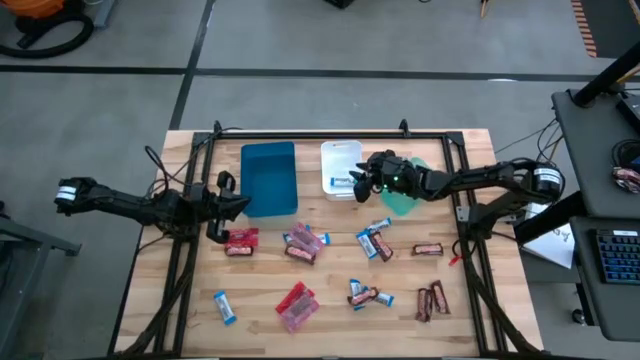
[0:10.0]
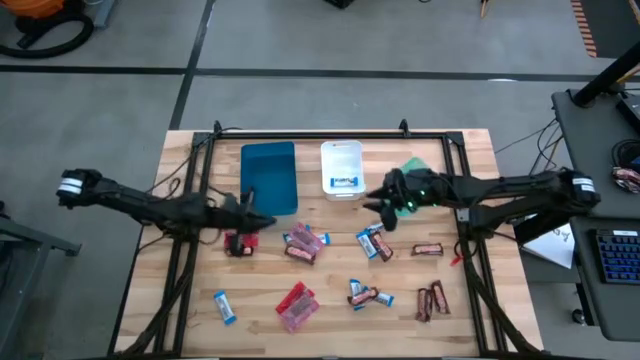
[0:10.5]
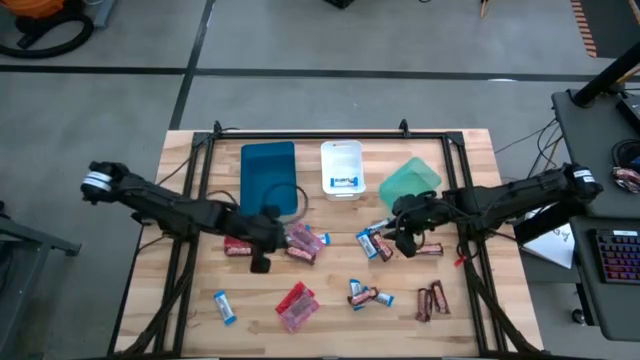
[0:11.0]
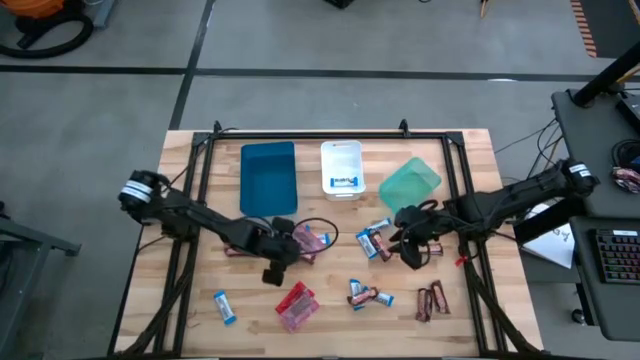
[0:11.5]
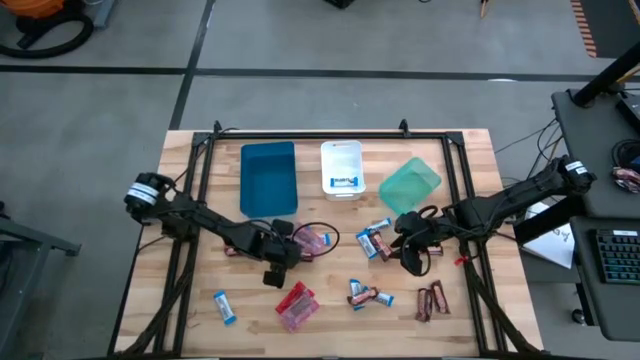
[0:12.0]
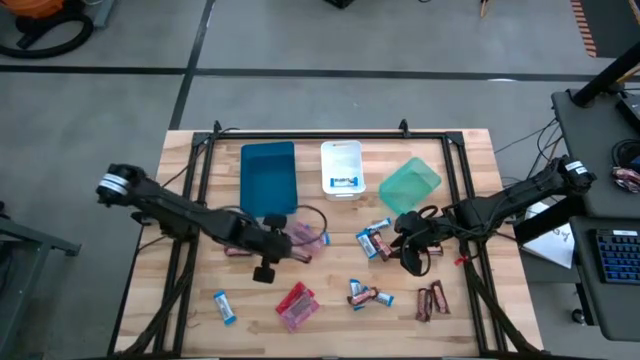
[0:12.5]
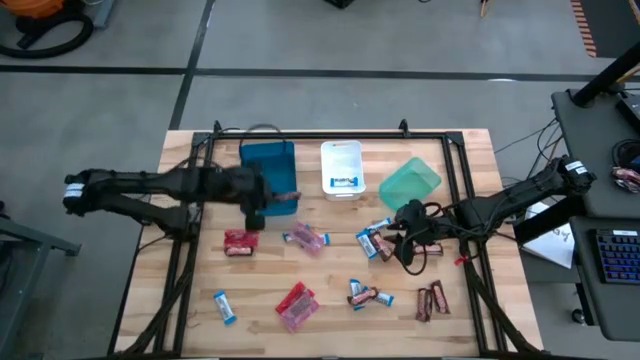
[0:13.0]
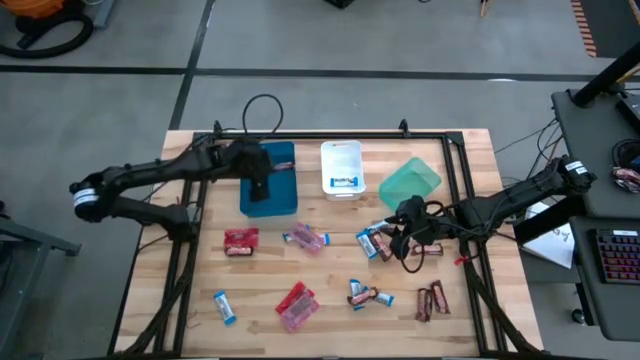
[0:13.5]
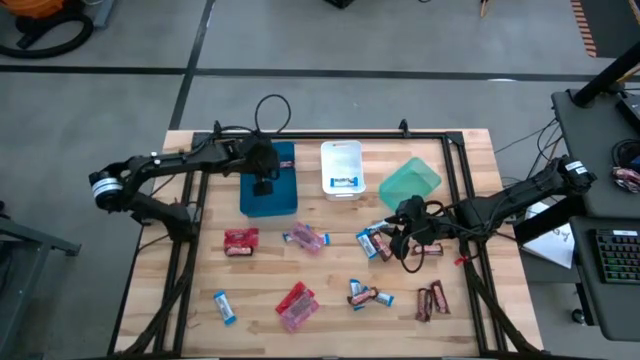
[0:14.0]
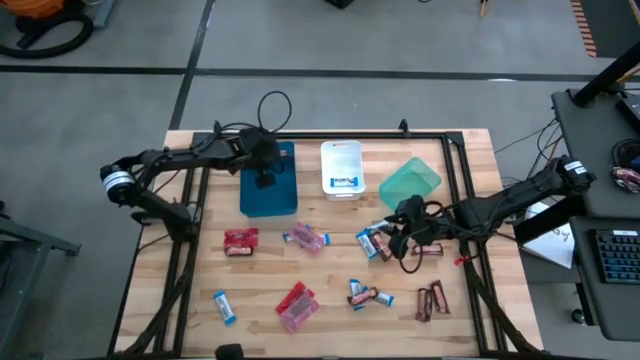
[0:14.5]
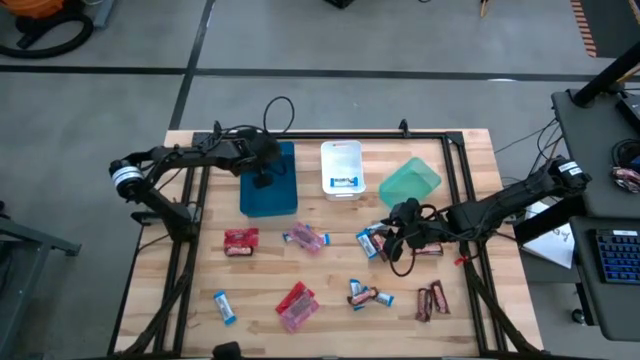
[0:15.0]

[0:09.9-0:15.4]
Task: Sort candy
Put the brown chocolate into the blue bin

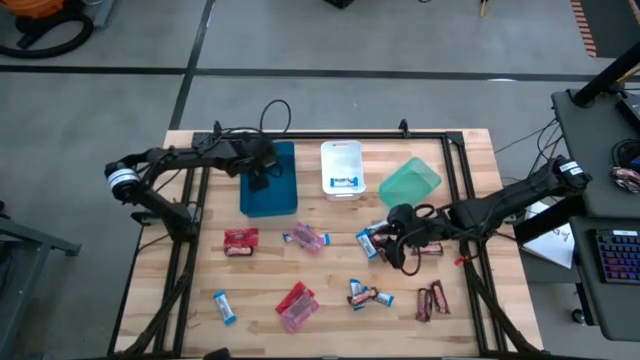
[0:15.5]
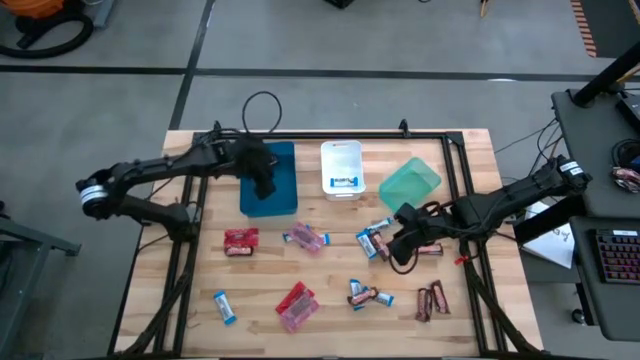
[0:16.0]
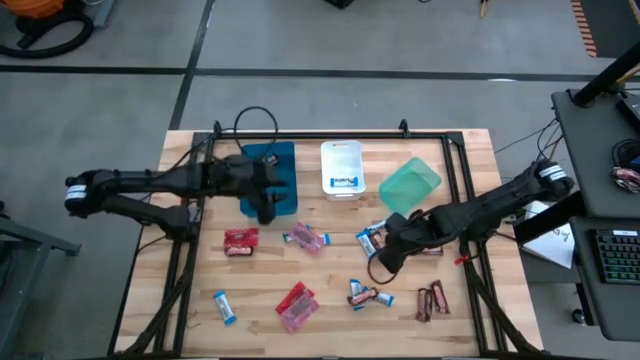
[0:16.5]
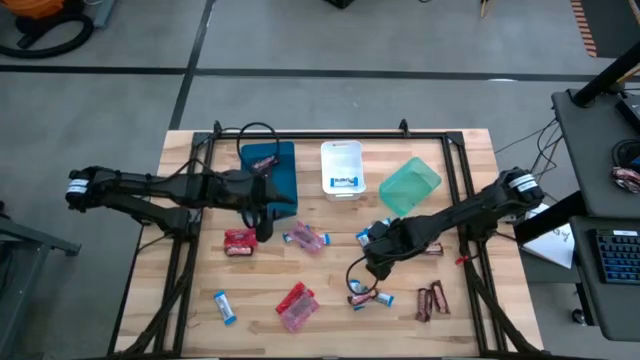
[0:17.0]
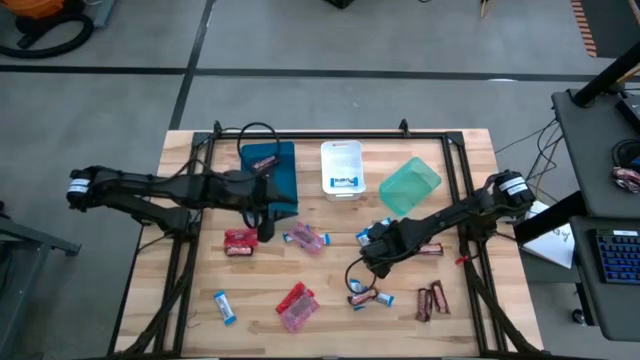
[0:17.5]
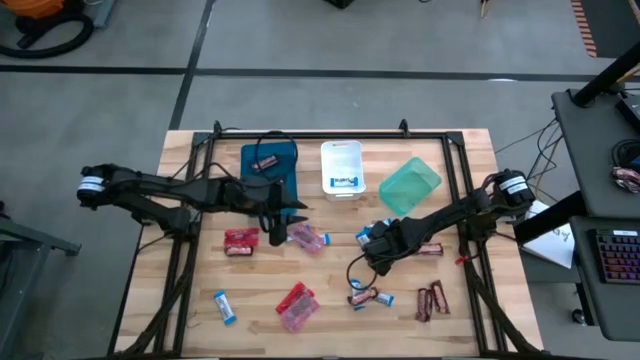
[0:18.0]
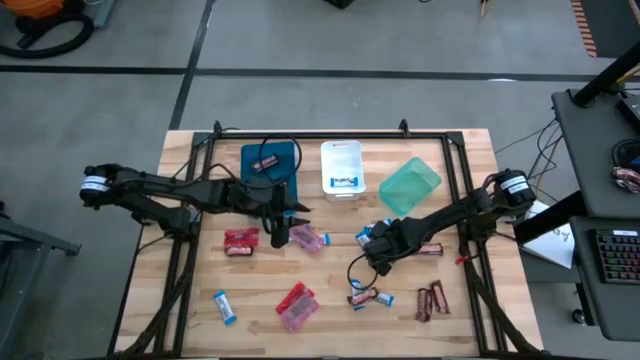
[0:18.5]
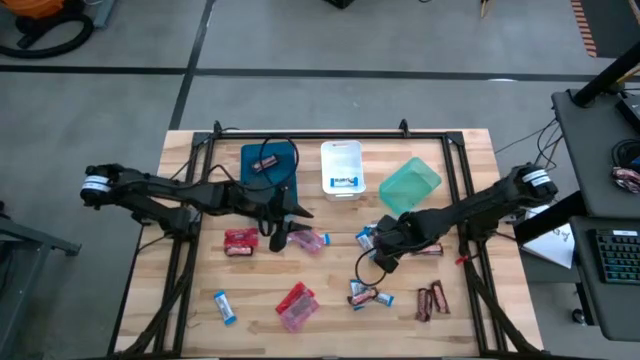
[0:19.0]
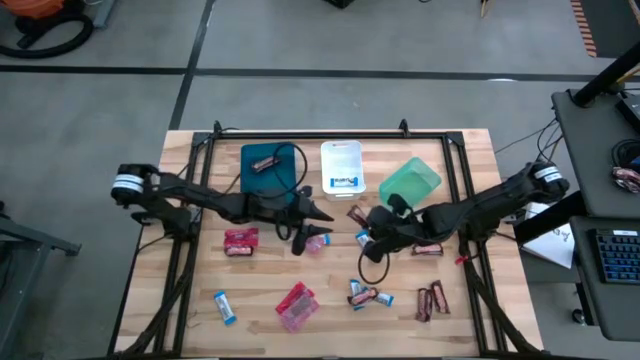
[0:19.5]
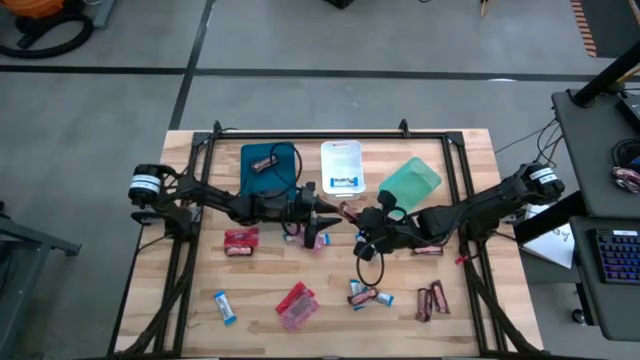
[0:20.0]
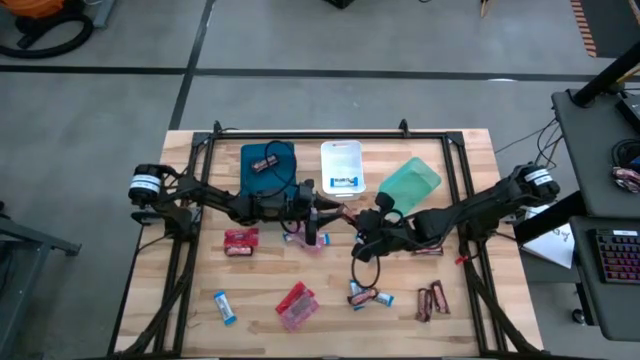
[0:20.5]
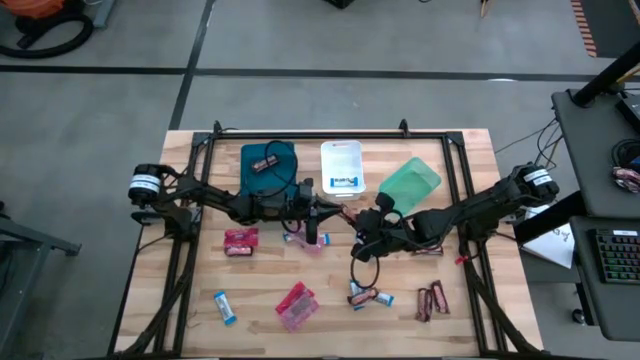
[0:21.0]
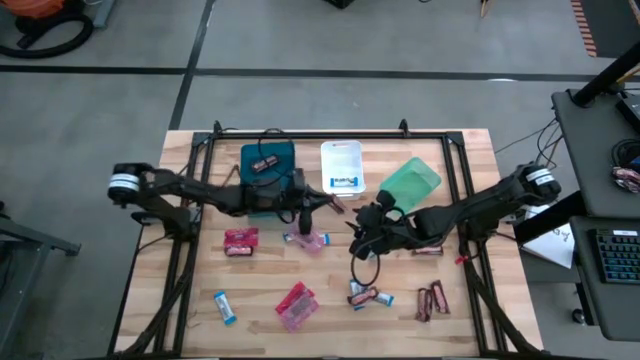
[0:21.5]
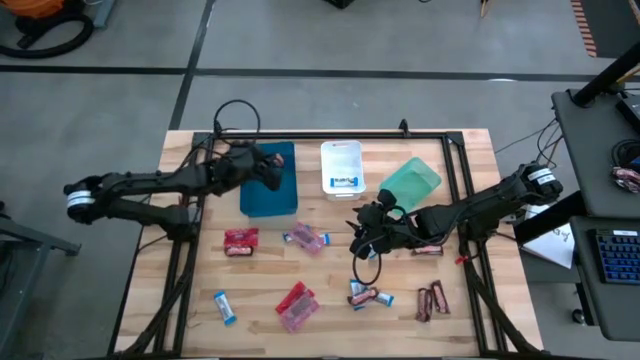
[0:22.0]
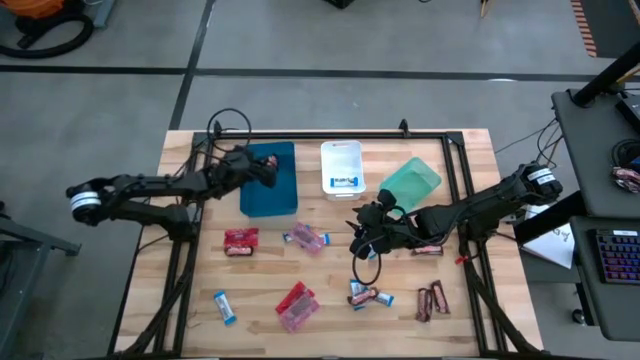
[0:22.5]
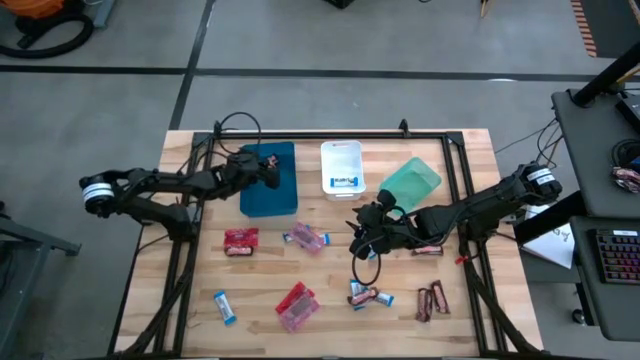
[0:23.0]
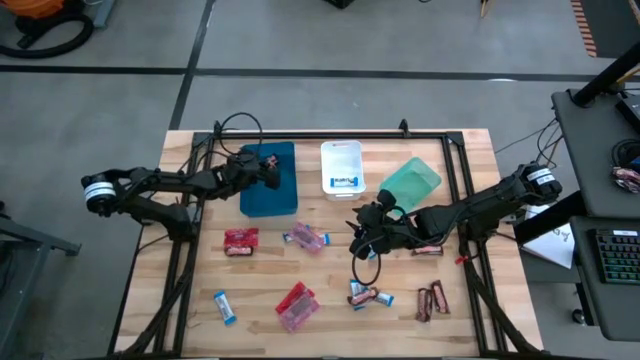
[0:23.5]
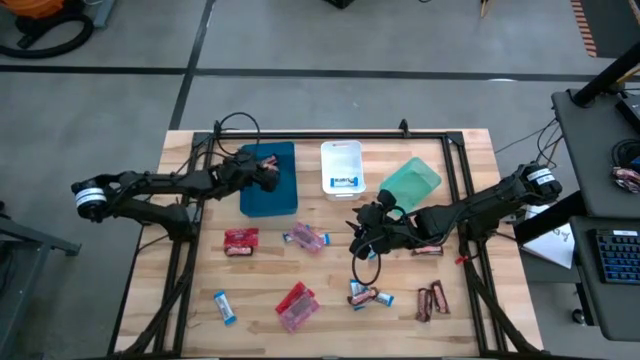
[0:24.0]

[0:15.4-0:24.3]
Put the brown chocolate into the blue bin

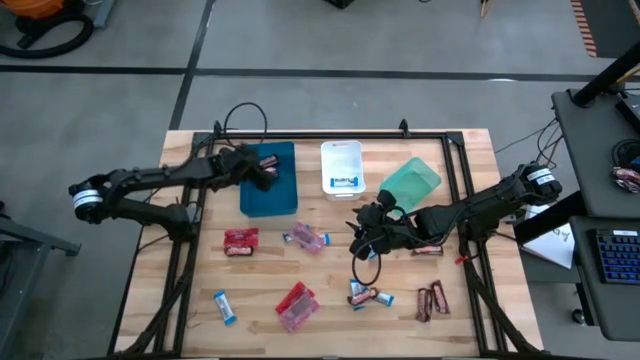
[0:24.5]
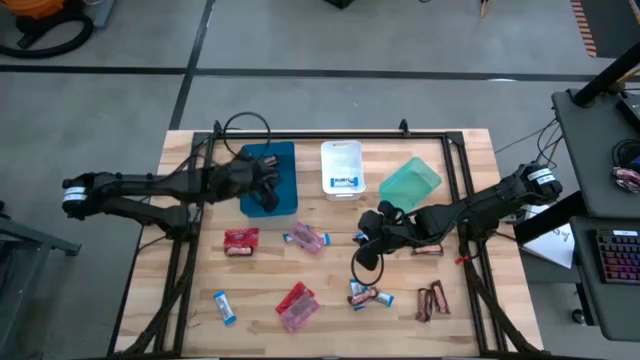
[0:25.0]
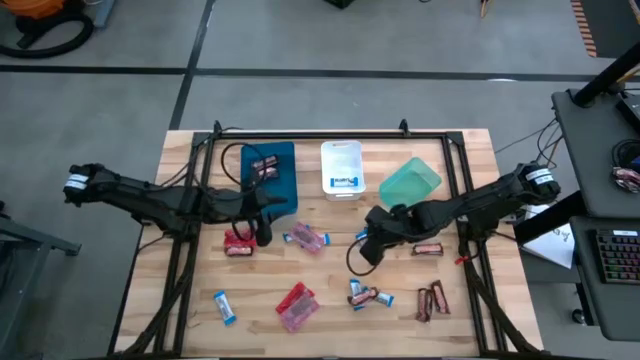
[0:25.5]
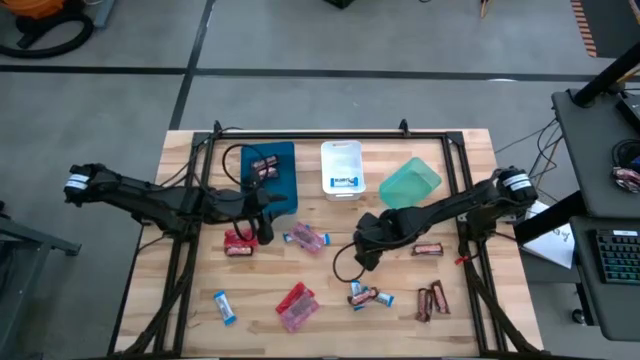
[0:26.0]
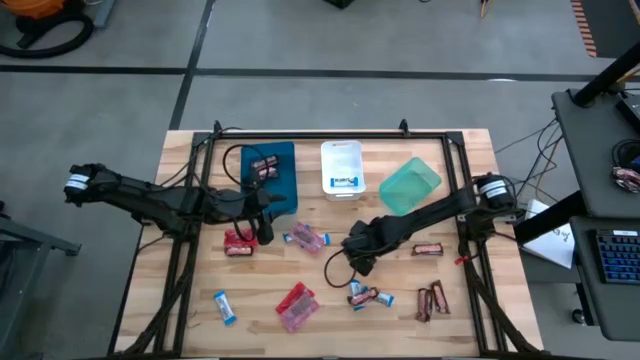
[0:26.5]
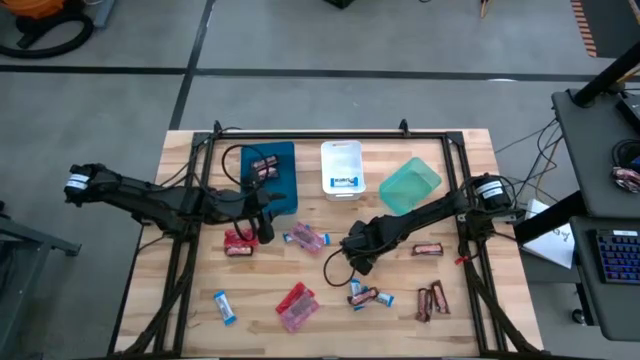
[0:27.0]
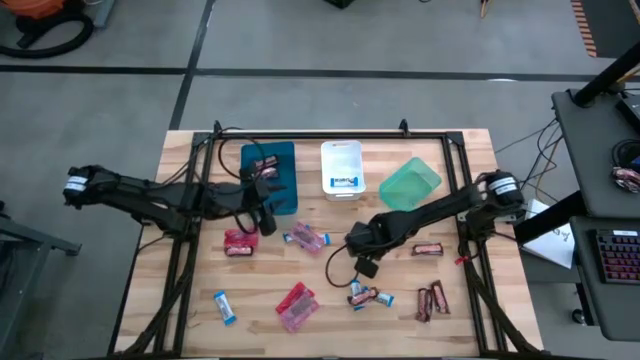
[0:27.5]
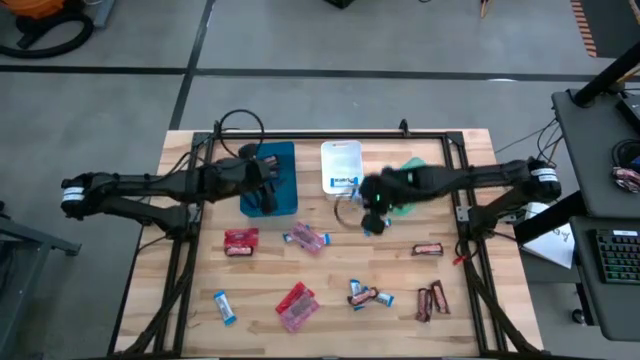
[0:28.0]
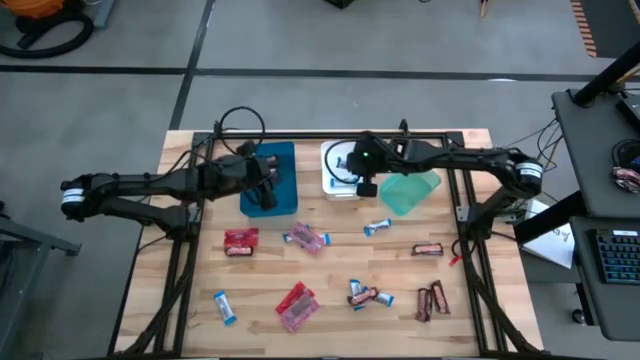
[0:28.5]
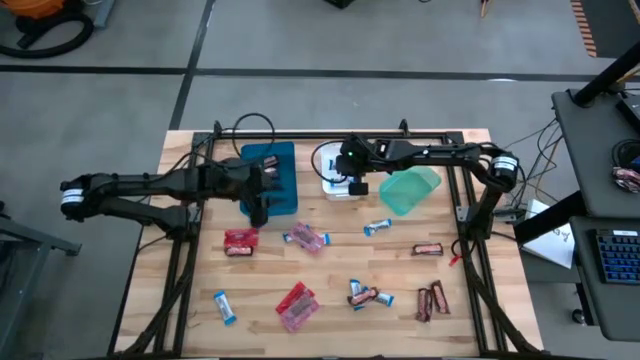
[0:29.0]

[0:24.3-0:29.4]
Put the white chocolate into the white bin
